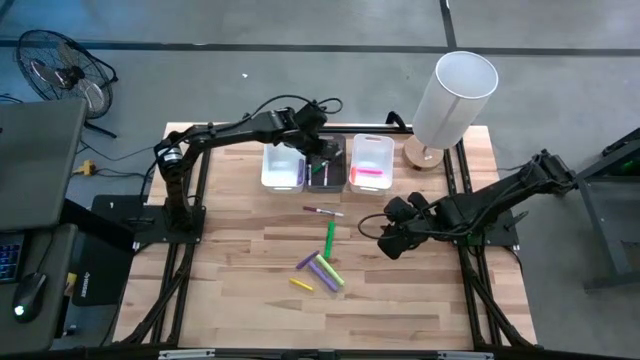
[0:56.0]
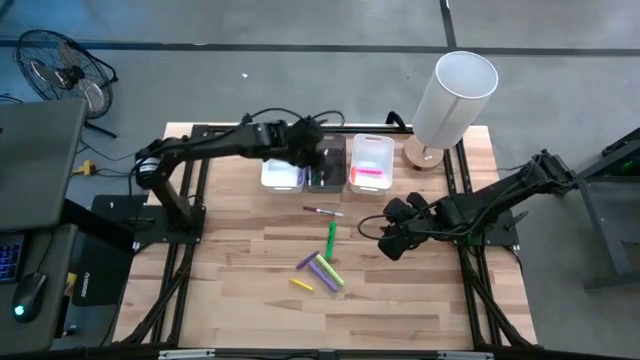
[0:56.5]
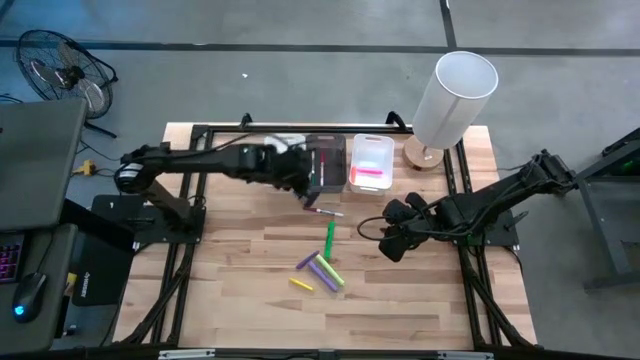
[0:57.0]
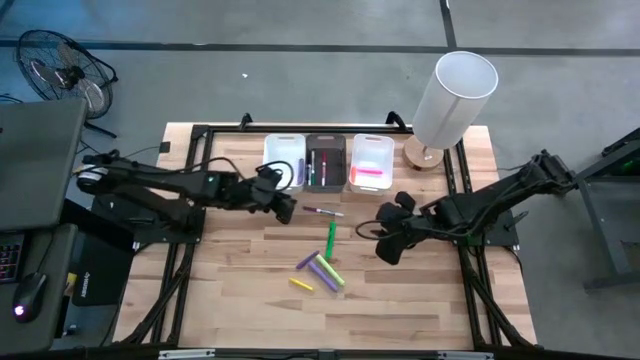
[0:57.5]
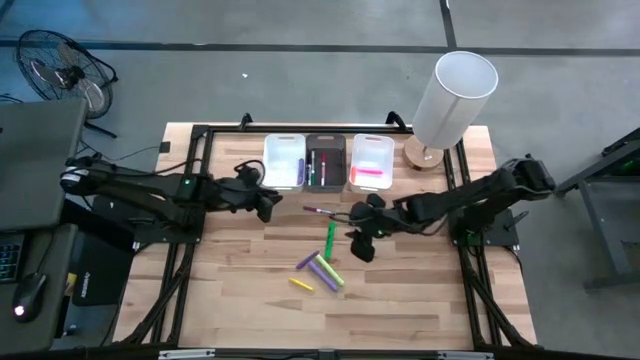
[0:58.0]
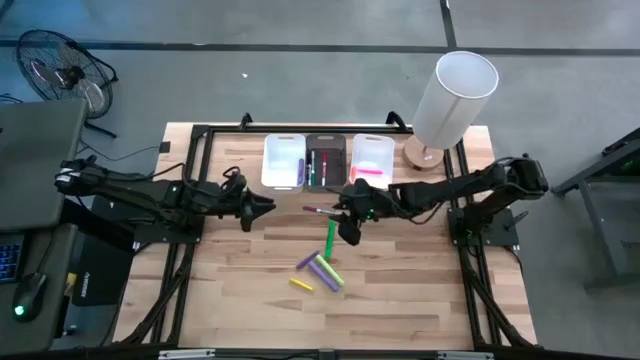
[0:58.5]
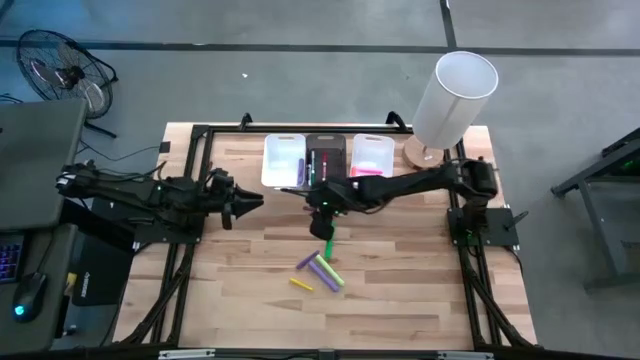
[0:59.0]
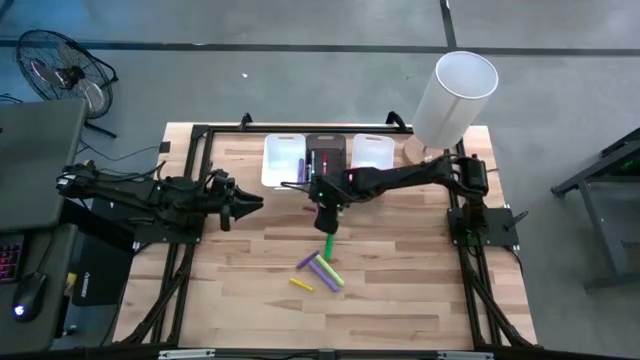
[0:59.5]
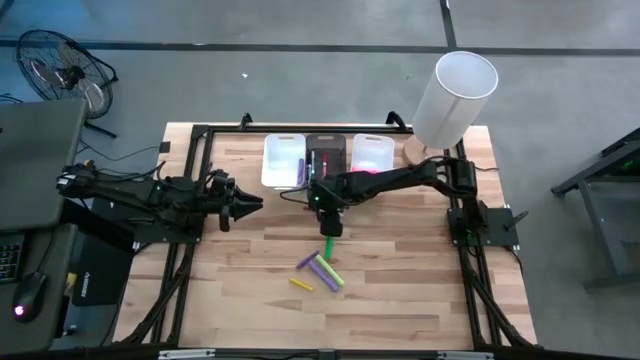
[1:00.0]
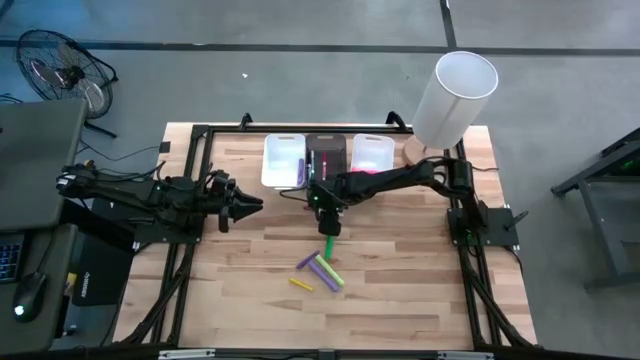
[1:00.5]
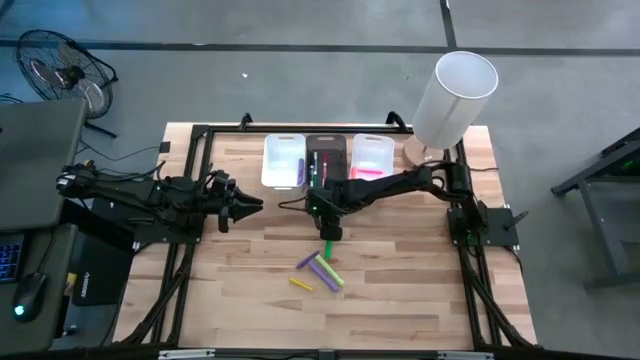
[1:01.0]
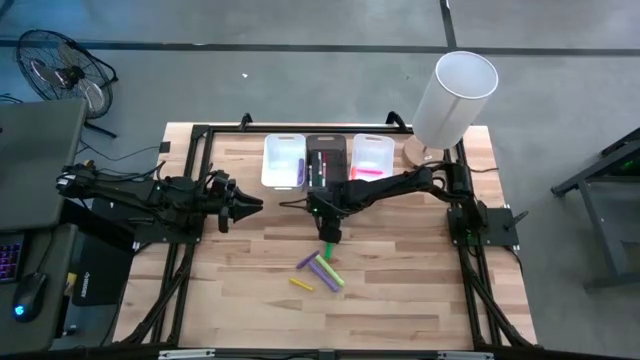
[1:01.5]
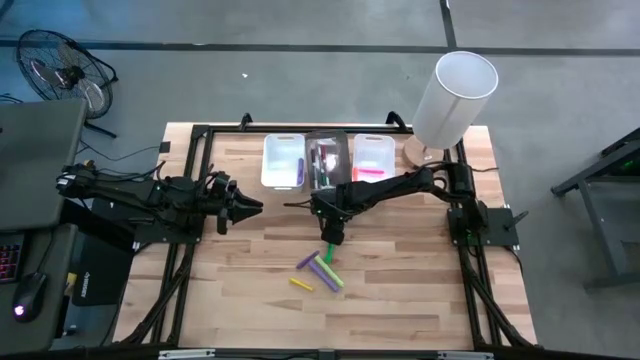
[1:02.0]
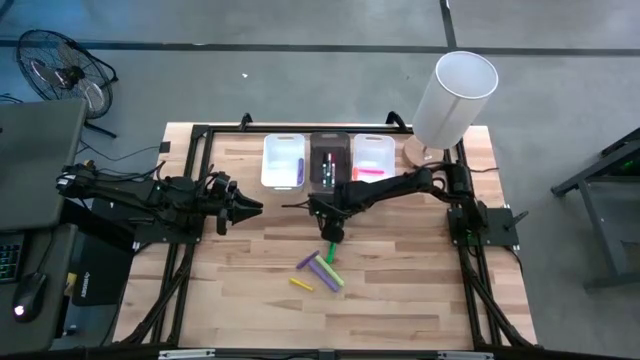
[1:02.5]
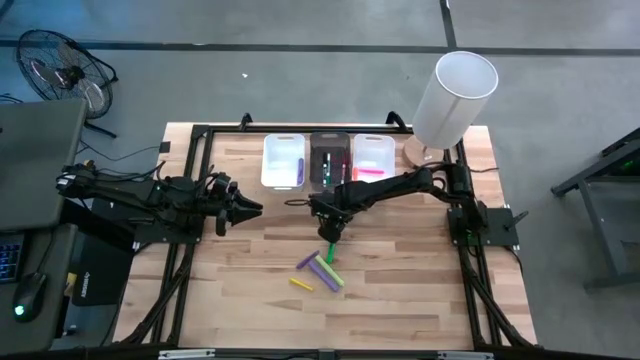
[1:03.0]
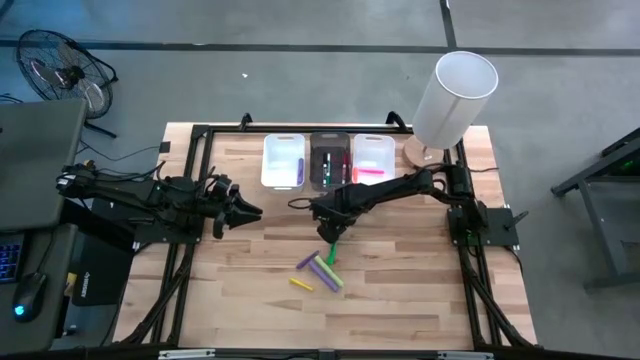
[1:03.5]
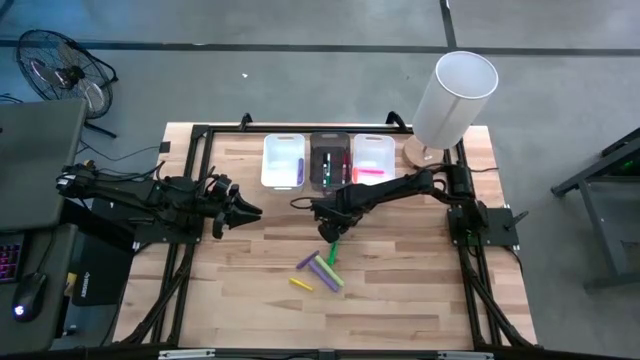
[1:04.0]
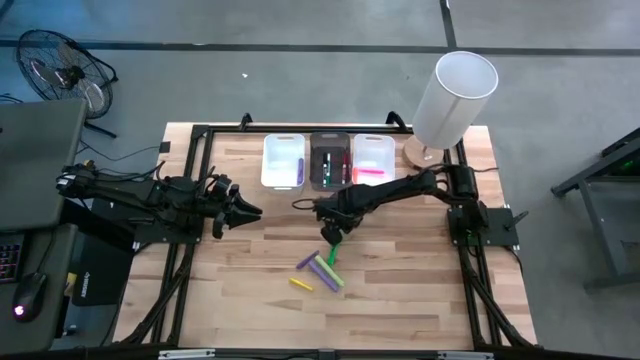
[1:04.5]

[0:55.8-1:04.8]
Task: Pick & Place Markers
Put the purple marker pen into the black bin

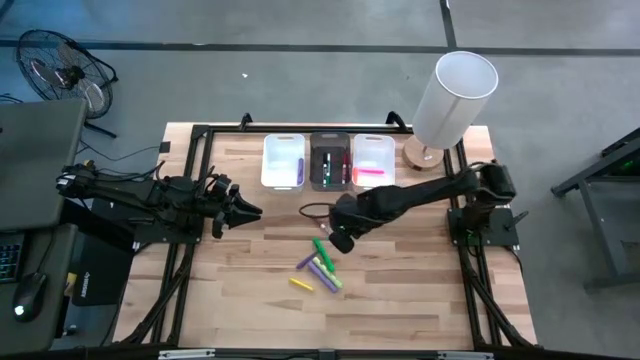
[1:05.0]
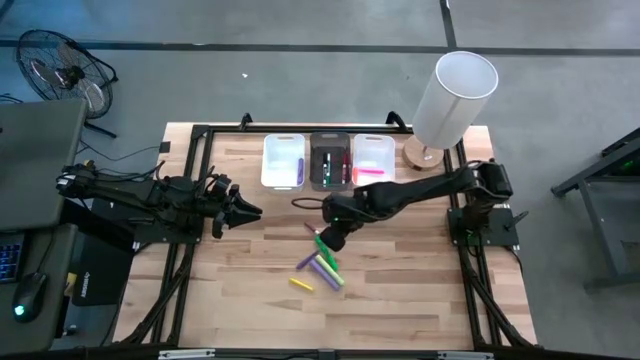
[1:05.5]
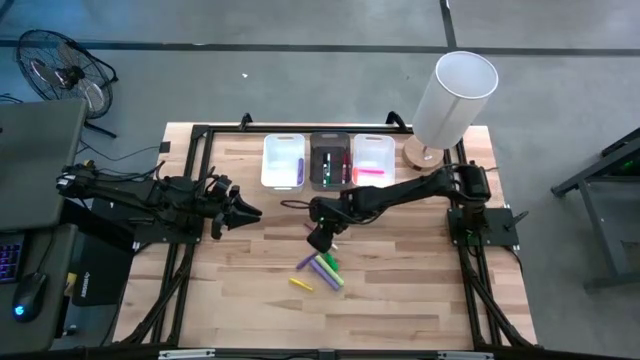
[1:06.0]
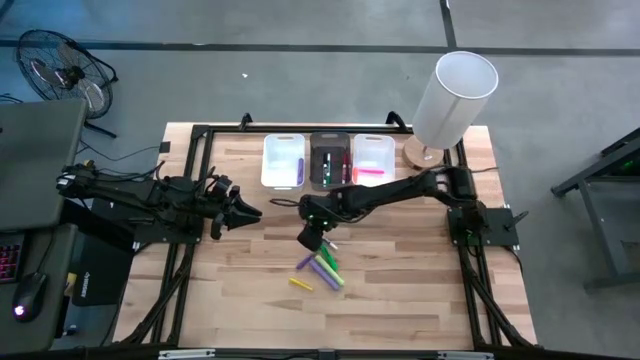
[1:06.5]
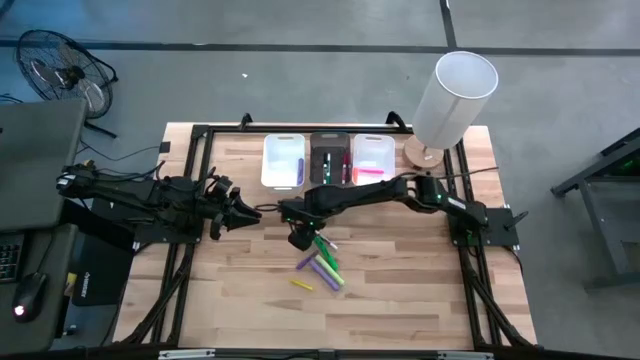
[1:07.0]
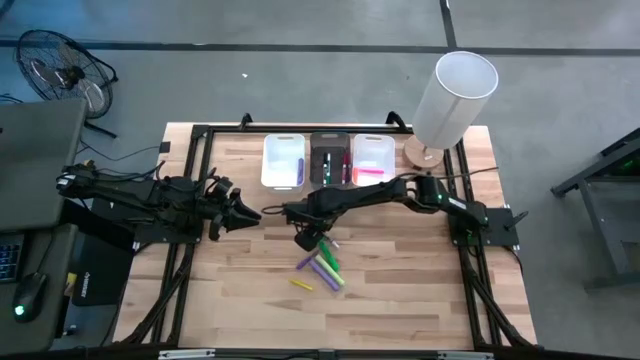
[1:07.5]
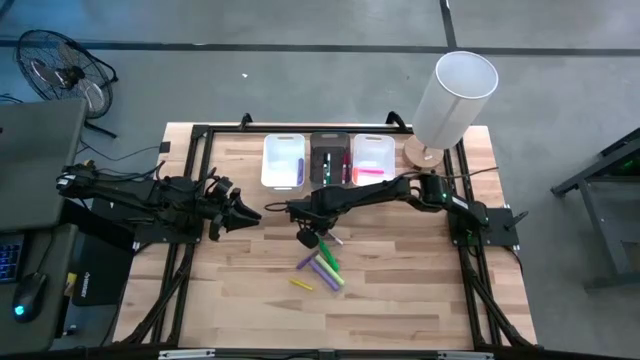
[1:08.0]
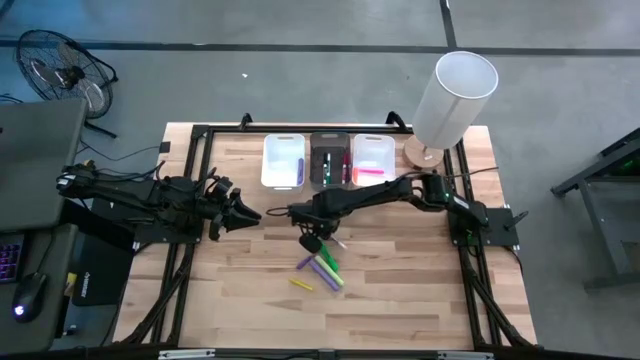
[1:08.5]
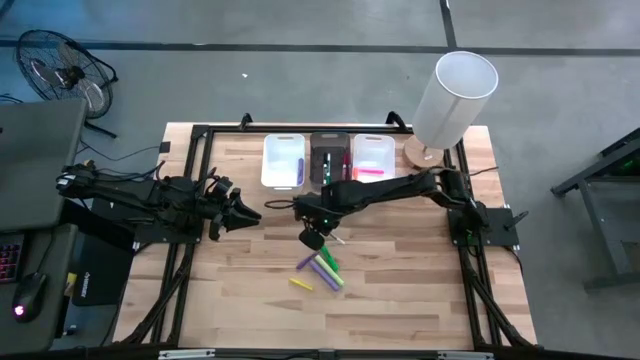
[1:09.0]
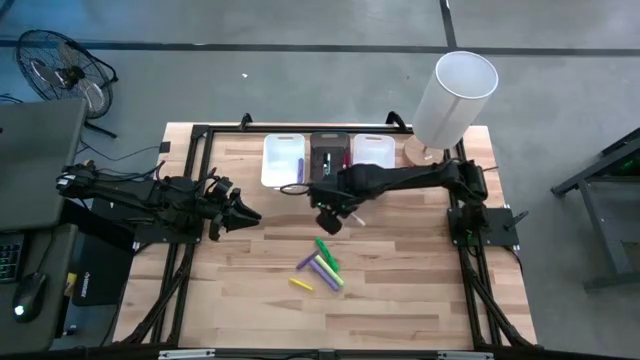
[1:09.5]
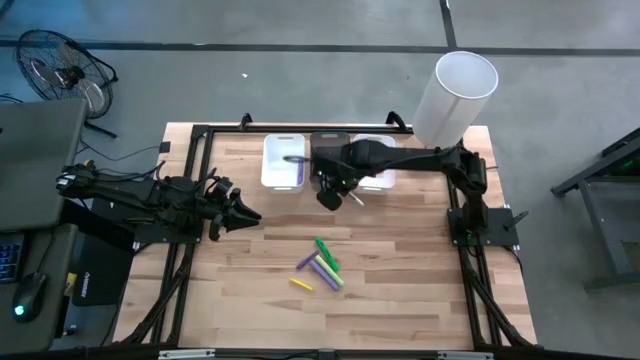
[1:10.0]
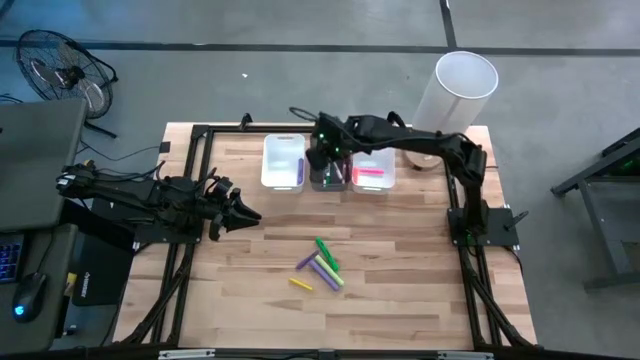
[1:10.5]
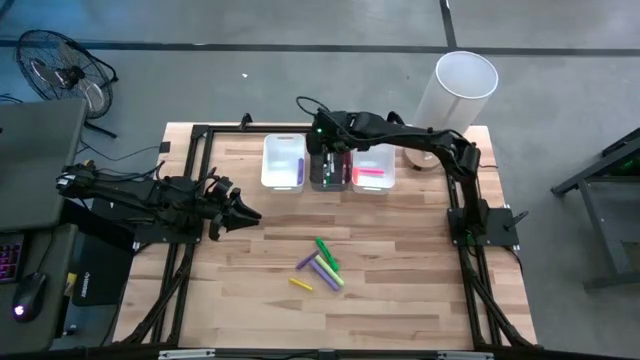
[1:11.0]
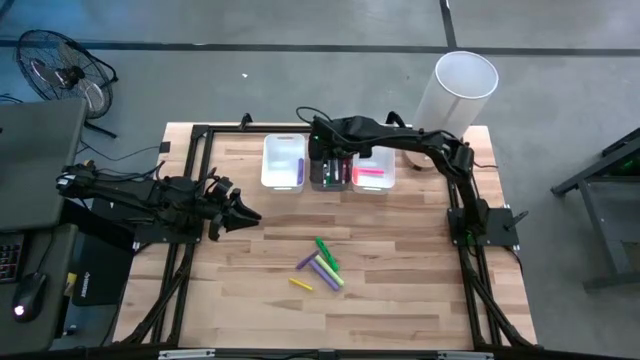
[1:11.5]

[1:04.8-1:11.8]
Put the purple marker pen into the black bin

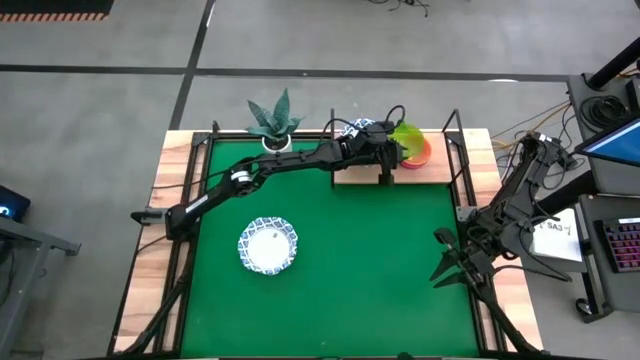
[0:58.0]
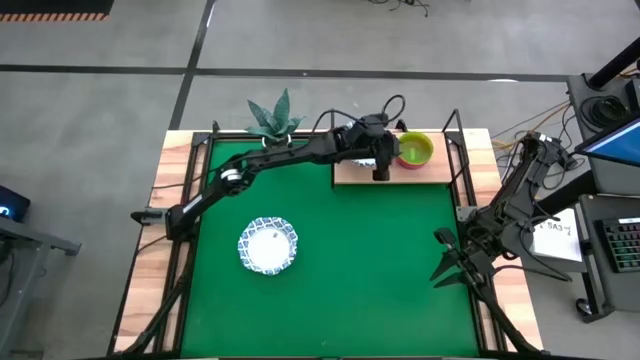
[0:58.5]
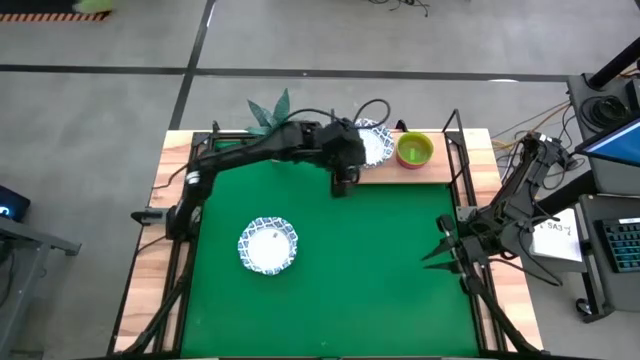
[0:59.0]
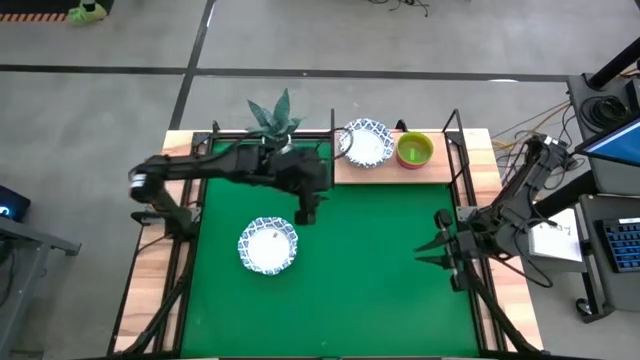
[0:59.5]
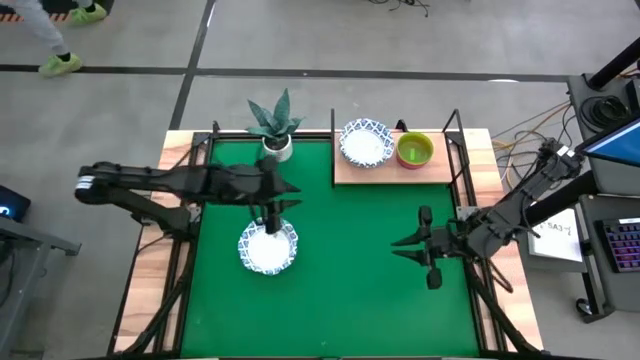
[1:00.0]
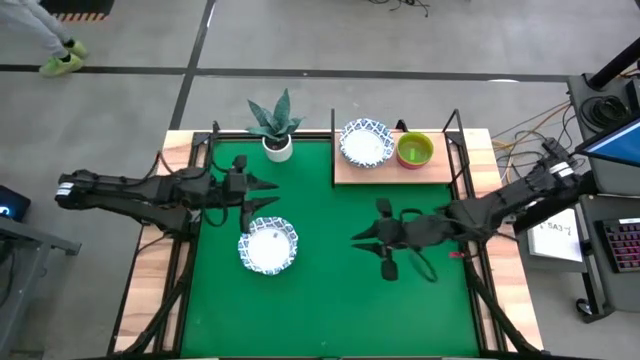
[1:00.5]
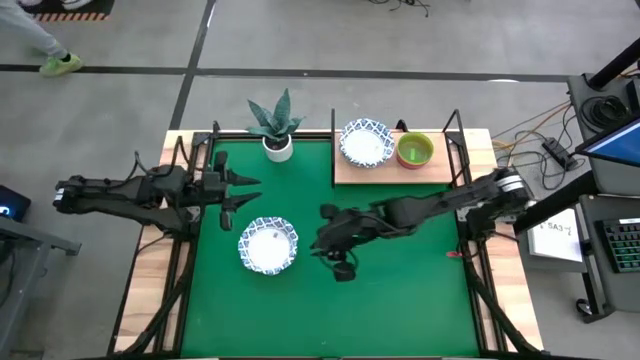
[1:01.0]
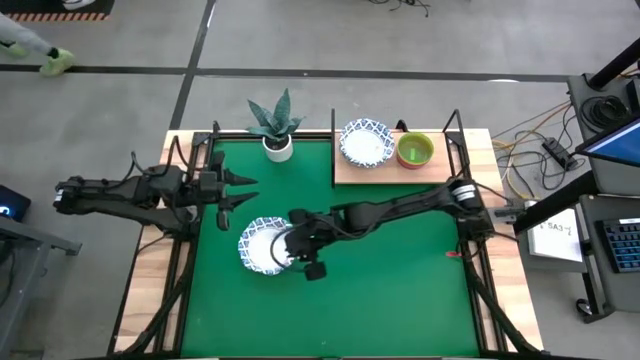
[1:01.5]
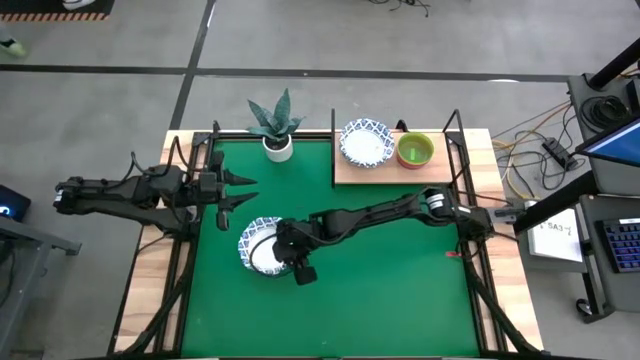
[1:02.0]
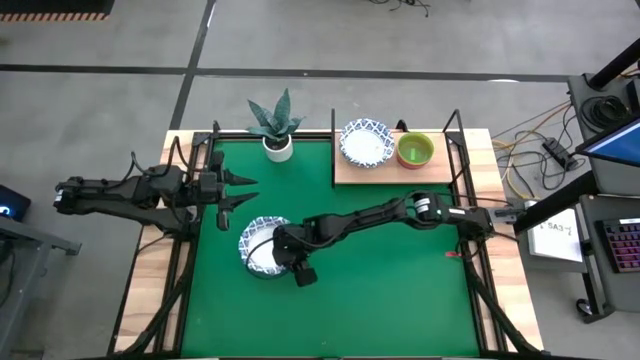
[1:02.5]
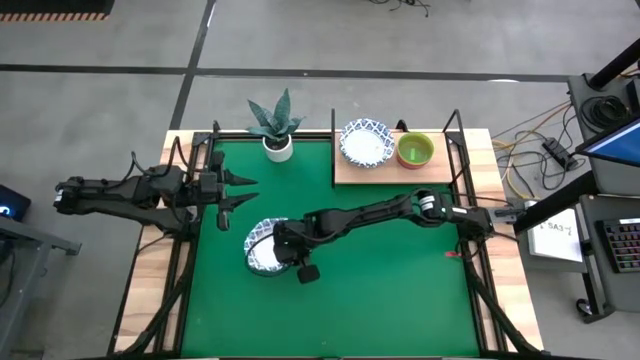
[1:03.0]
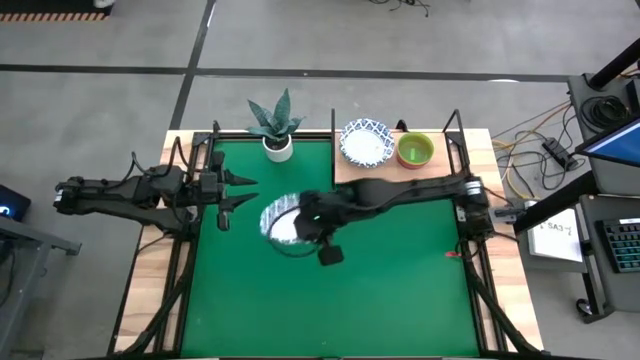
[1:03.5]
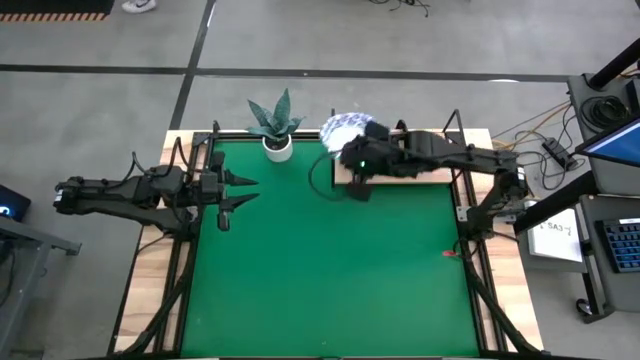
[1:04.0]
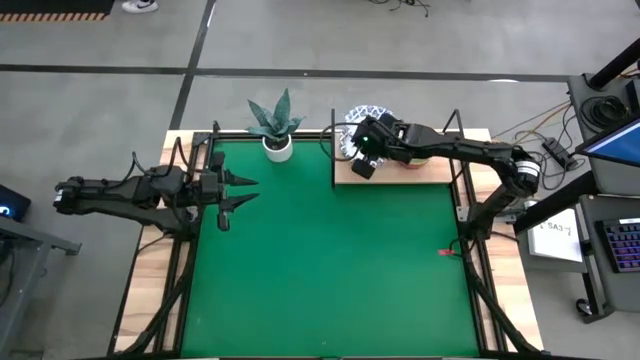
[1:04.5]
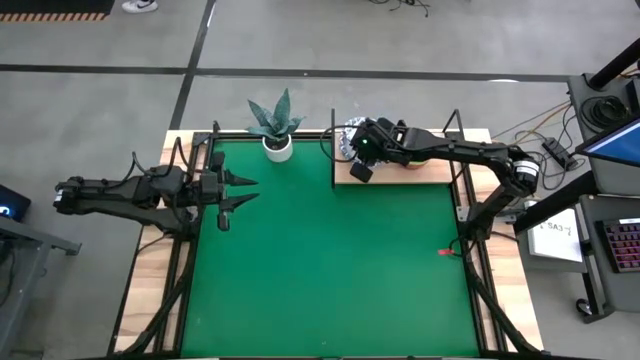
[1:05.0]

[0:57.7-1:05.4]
Task: Place and stack bowls onto a shelf
Stack the white patterned bowl on top of the white patterned bowl on the shelf
